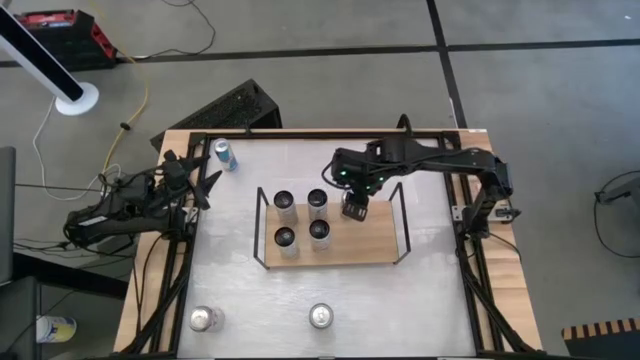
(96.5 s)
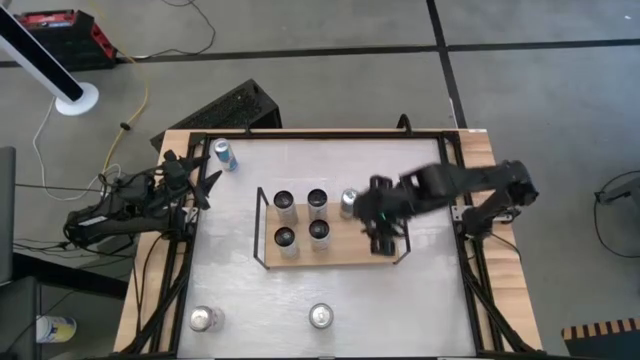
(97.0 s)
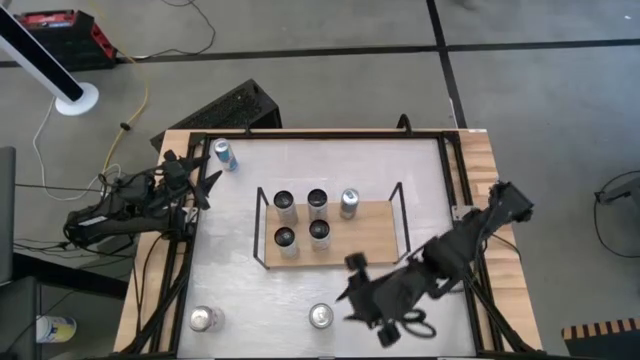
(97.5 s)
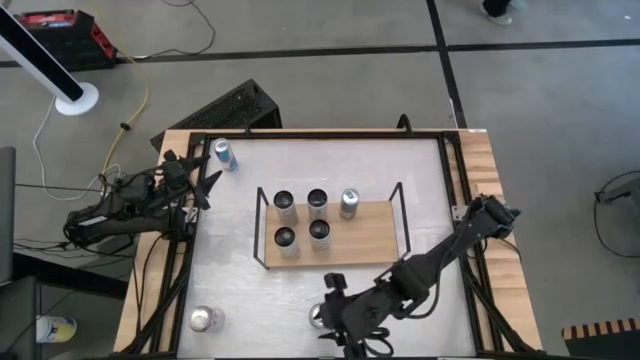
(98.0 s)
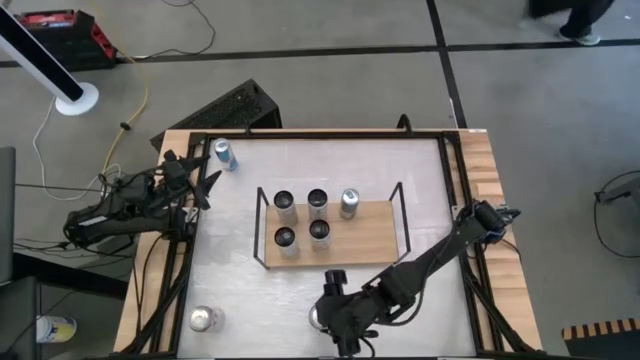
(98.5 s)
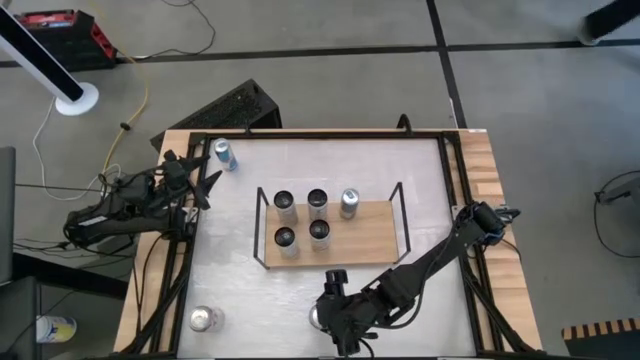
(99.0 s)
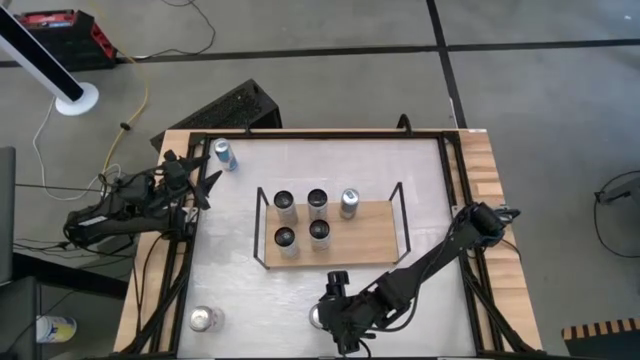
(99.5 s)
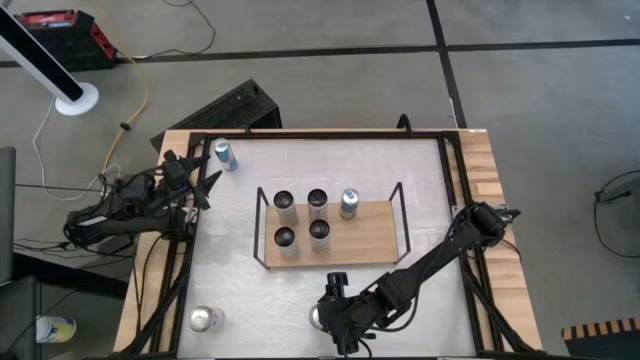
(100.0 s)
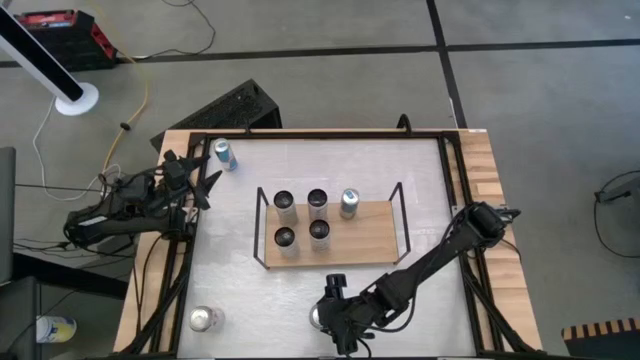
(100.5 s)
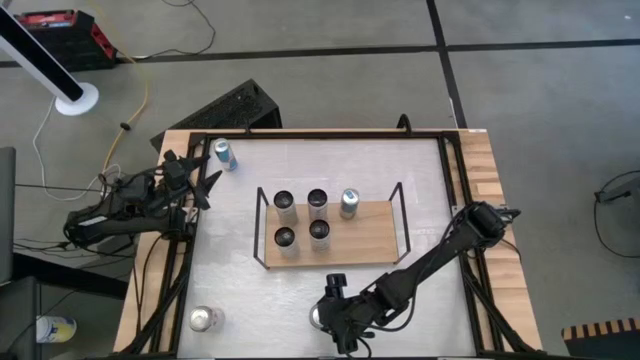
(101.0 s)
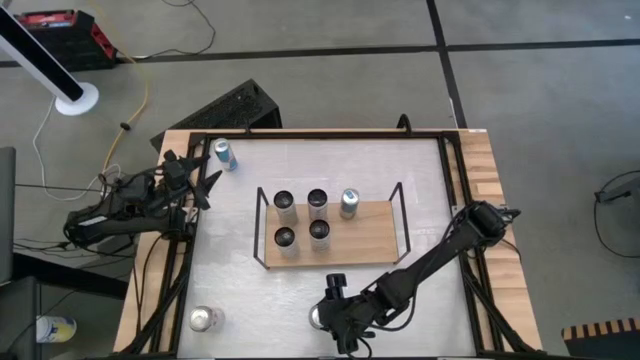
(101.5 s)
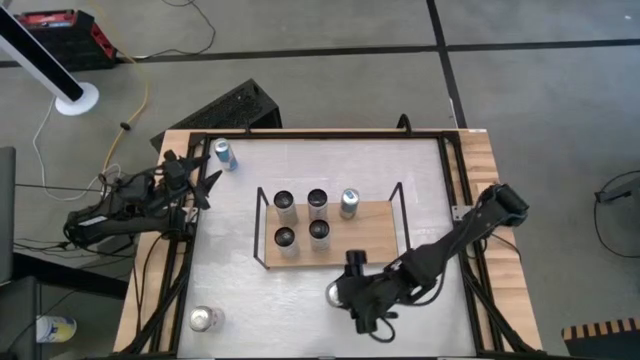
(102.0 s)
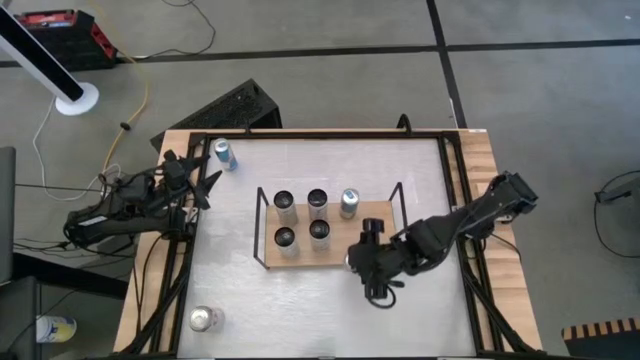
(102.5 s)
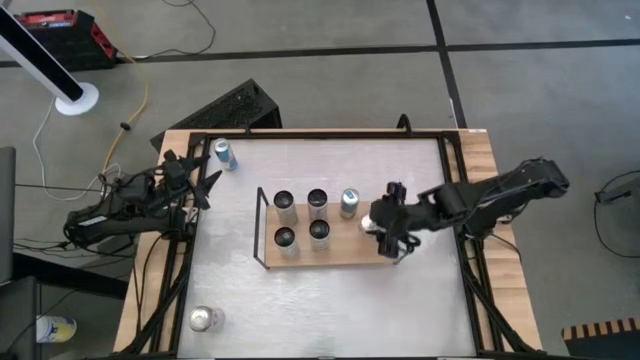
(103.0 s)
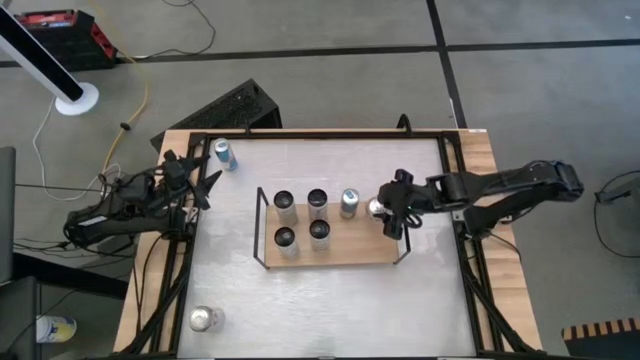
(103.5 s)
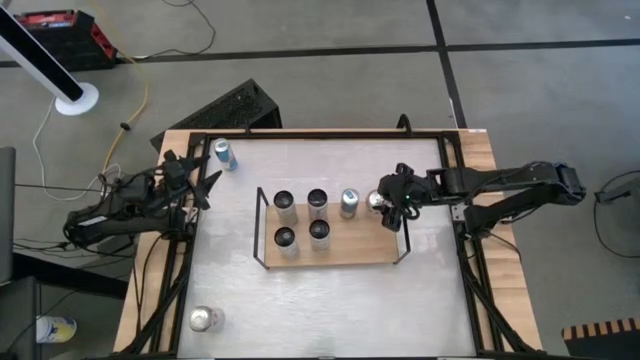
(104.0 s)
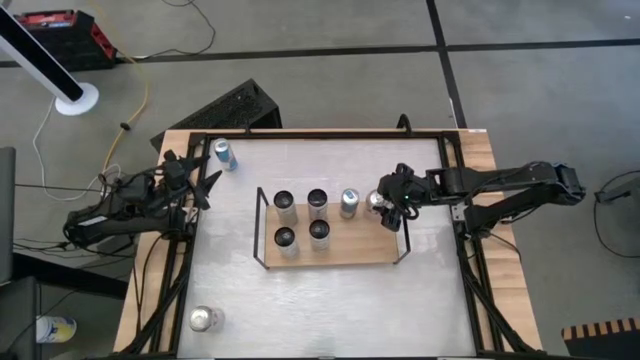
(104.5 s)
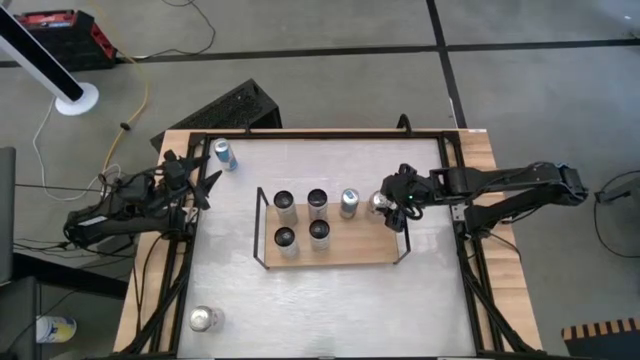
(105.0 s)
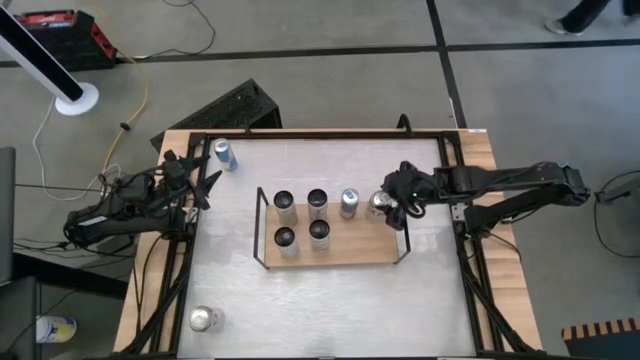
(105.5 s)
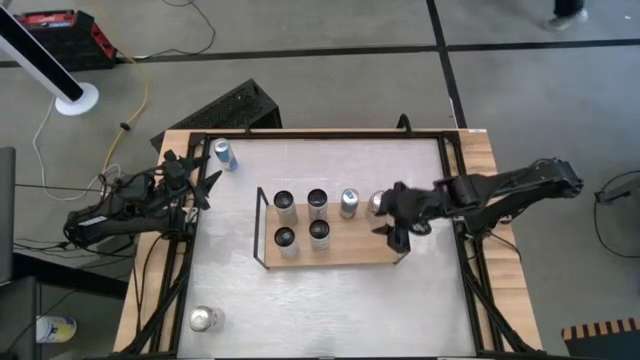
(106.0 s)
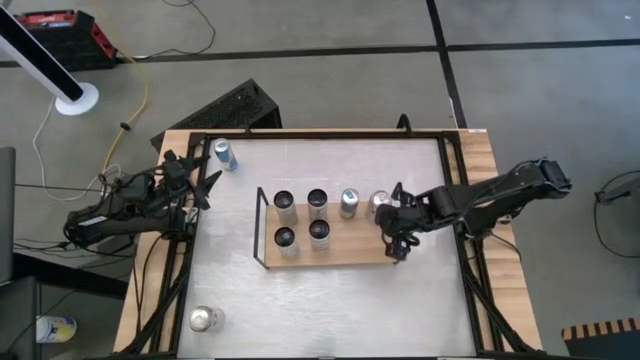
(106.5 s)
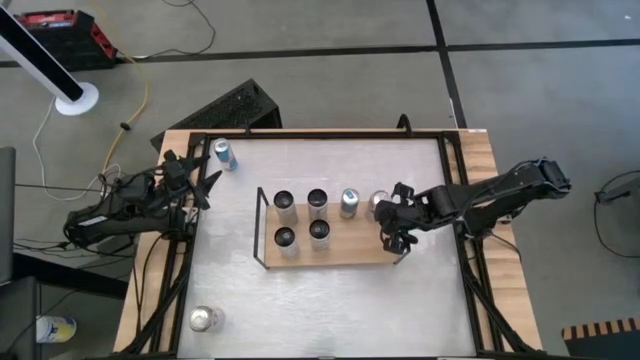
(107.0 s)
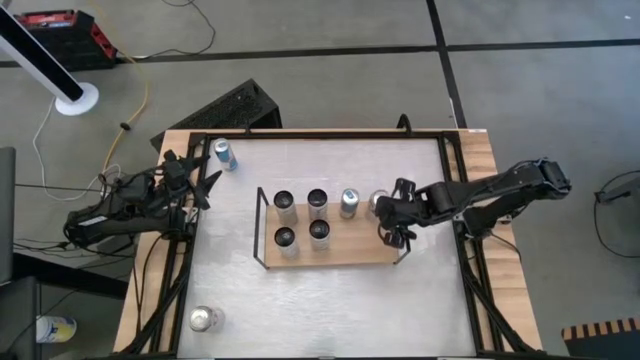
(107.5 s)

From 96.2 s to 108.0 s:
Task: Place canned beverage on shelf
Put the right red-silver soda can on the shelf

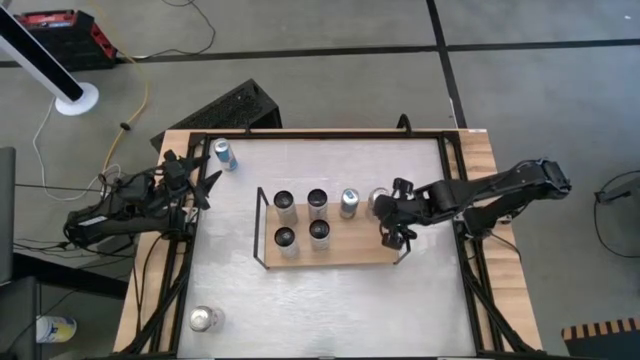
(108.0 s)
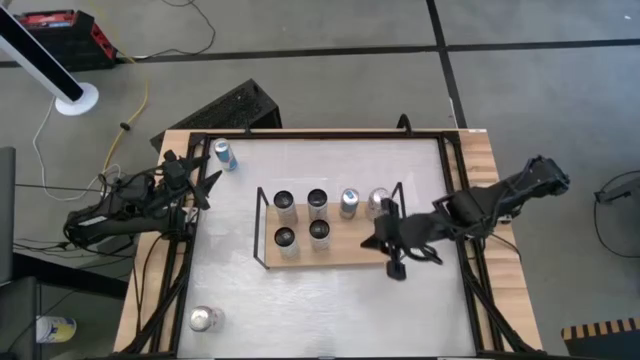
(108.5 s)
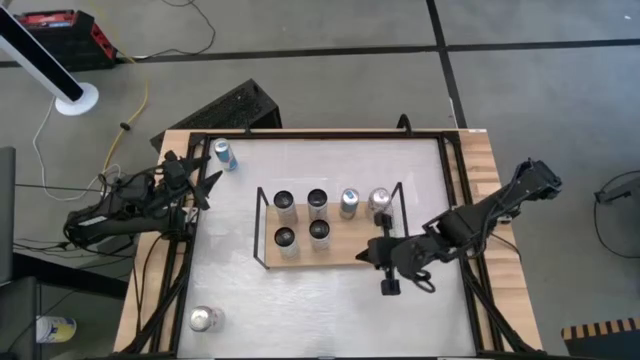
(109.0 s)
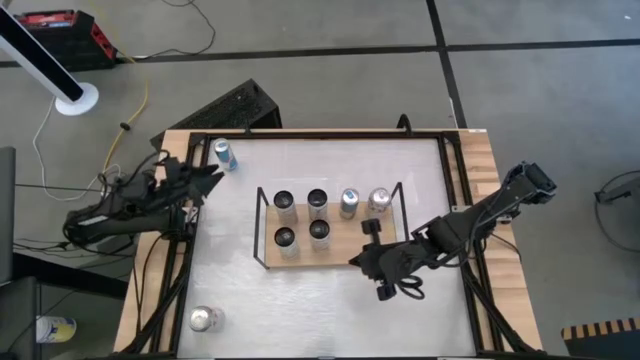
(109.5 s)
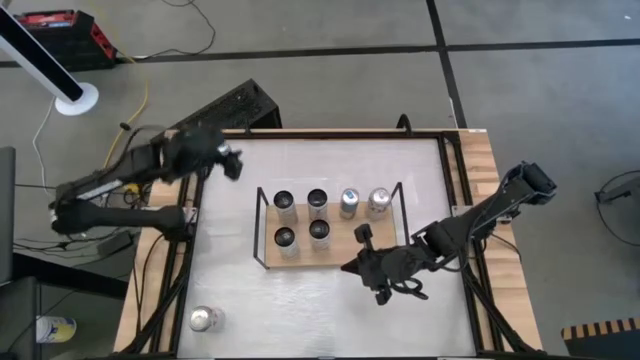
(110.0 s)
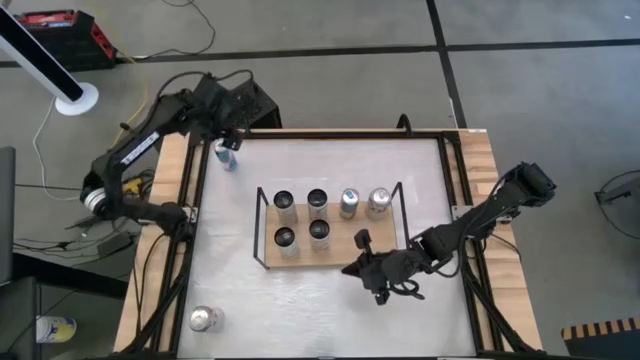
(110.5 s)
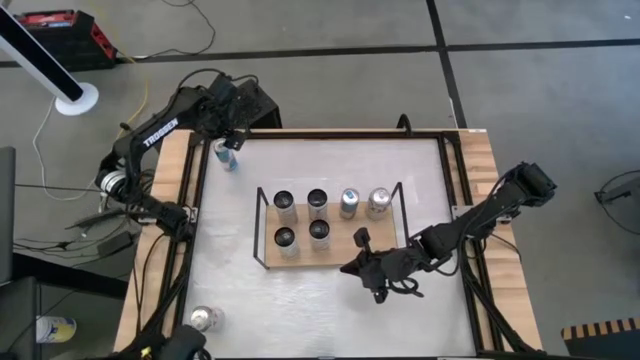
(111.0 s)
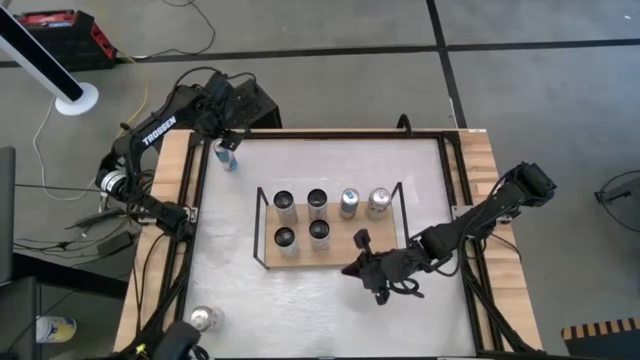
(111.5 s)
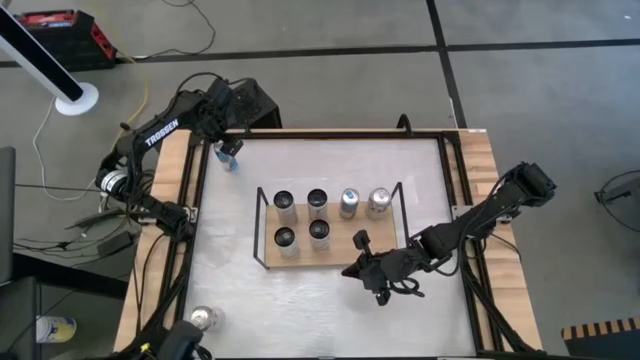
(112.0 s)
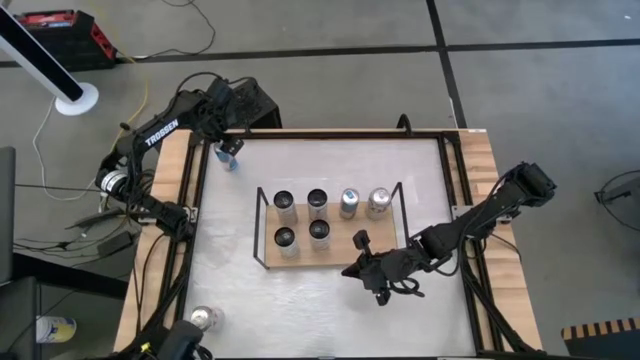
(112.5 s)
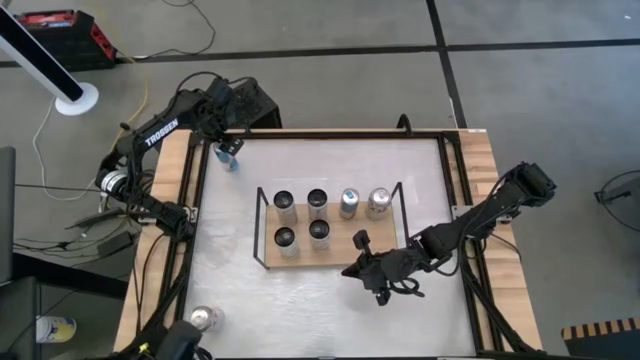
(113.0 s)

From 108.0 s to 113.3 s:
Put the blue soda can on the shelf aligned with the other blue soda can

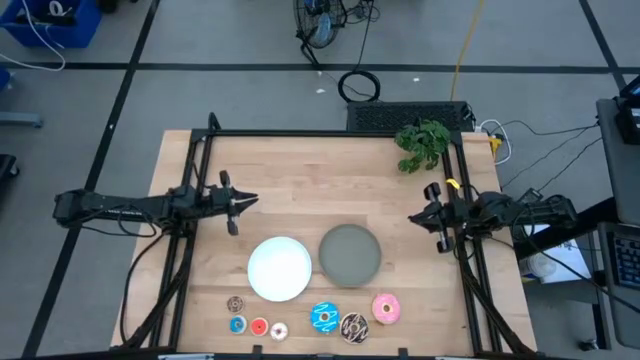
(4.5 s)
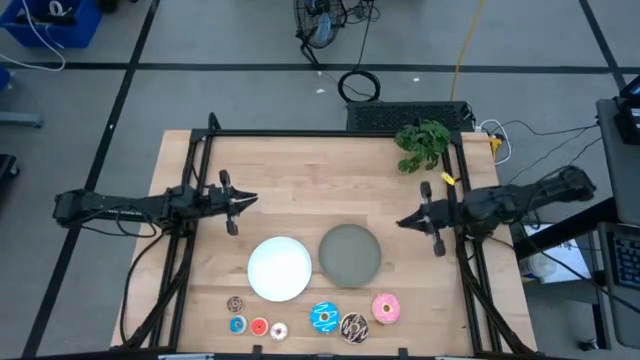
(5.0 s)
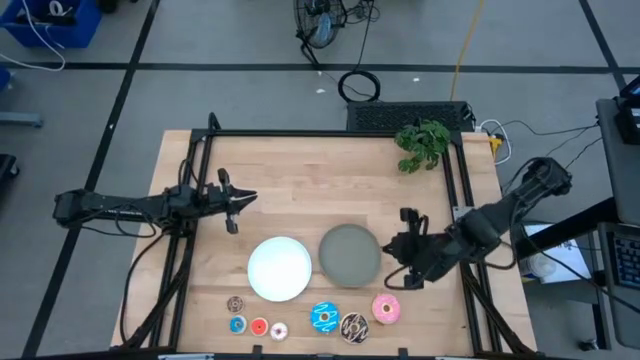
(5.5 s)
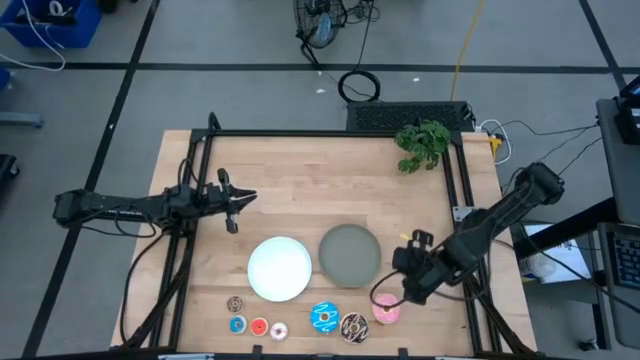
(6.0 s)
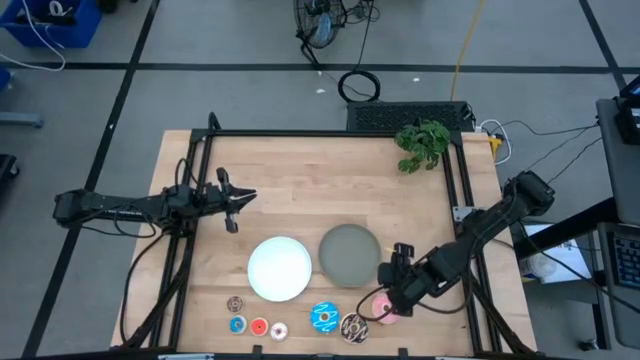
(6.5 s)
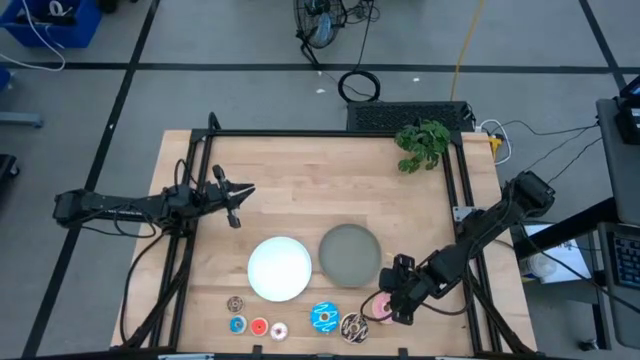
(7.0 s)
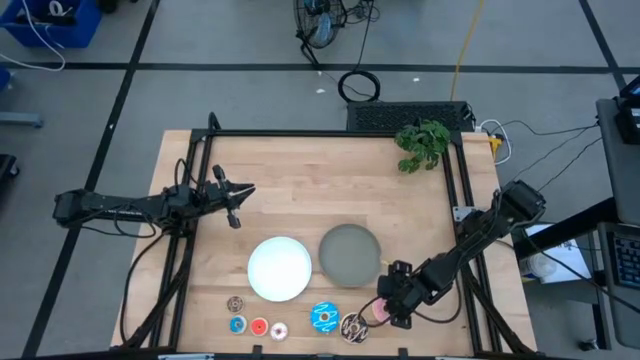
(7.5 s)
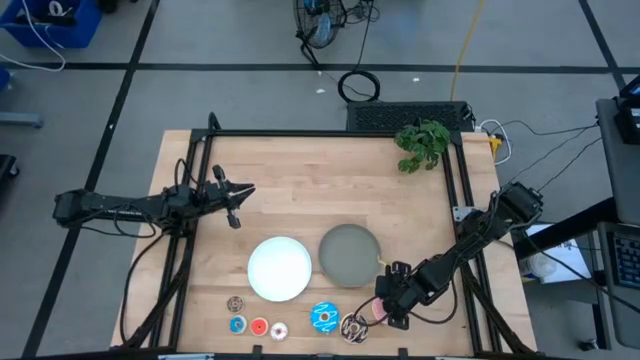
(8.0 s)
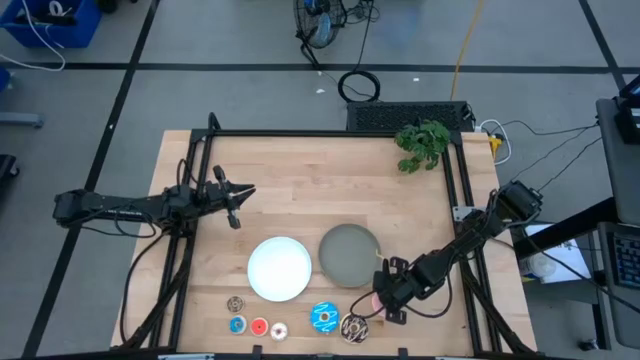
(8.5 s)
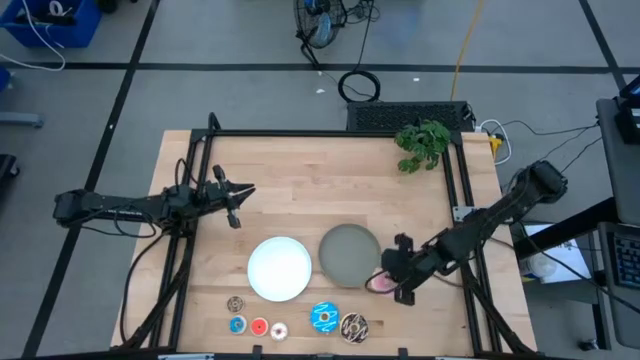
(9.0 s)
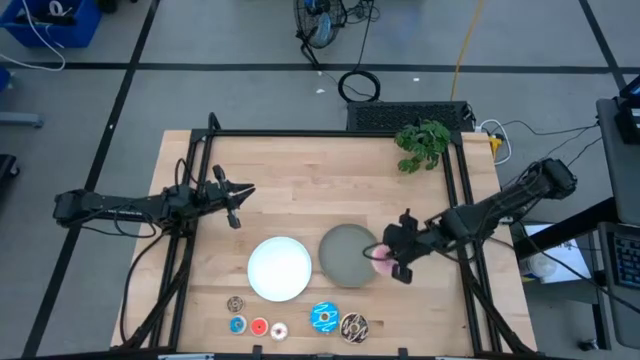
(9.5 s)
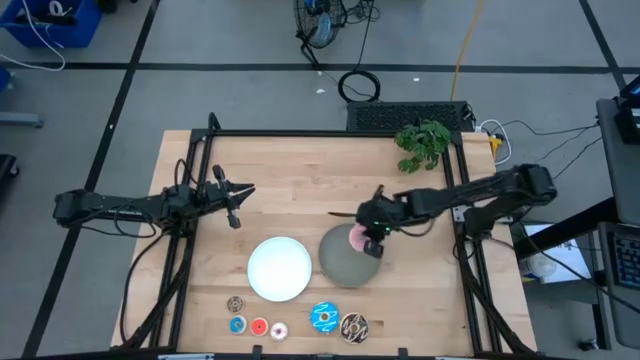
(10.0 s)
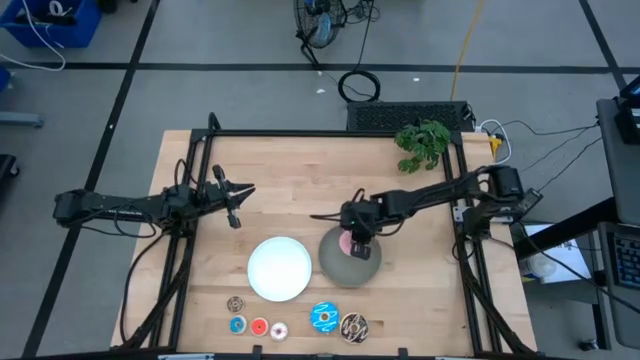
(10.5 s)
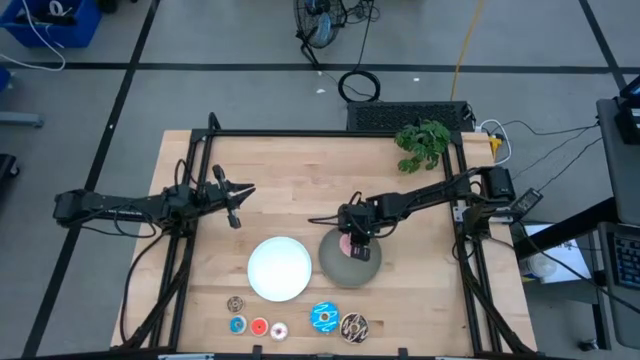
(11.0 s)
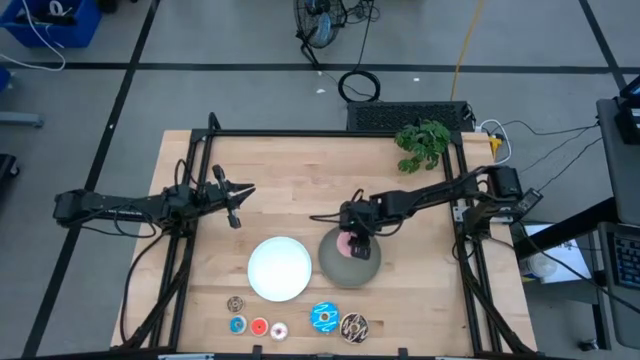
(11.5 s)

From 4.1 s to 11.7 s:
Task: Pick & Place donuts
Put the large pink donut on the gray plate
